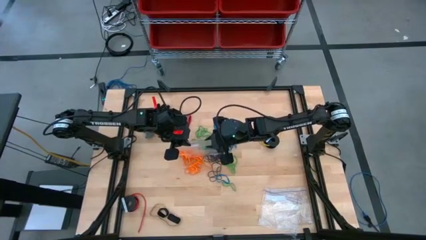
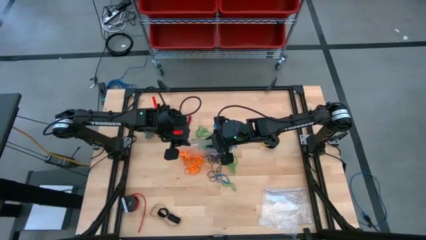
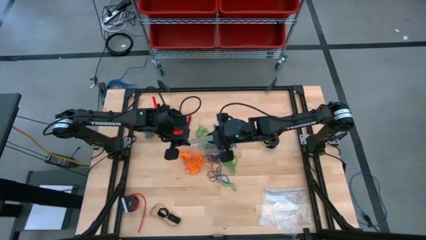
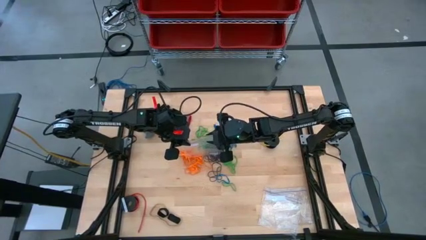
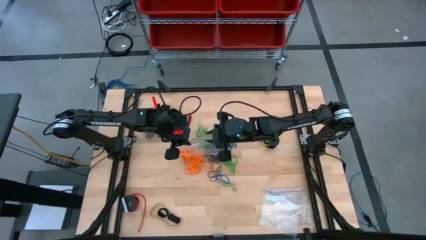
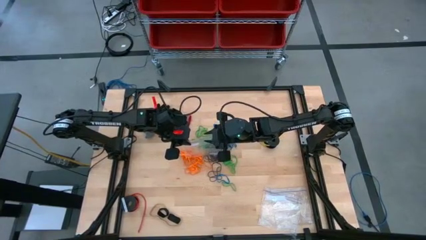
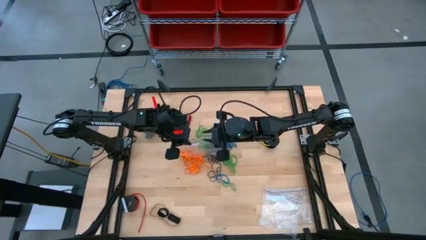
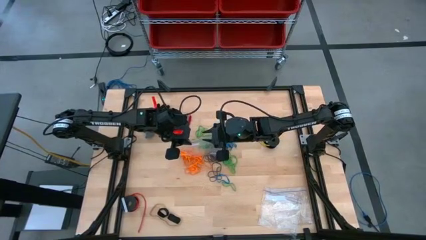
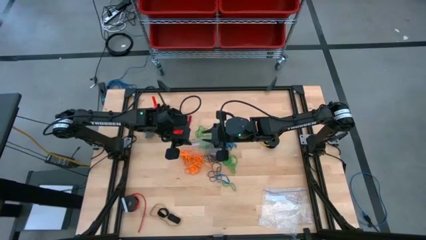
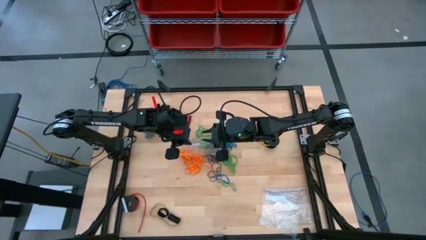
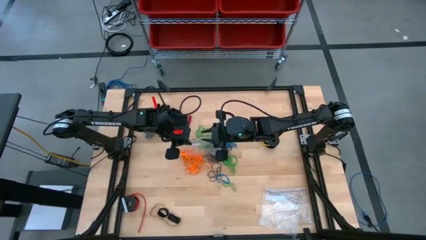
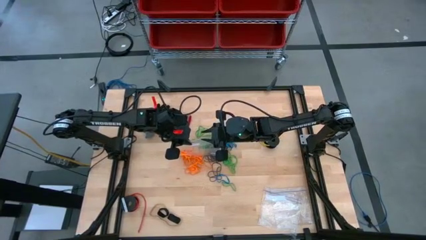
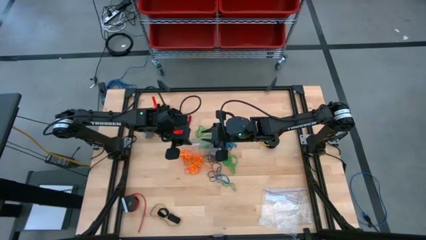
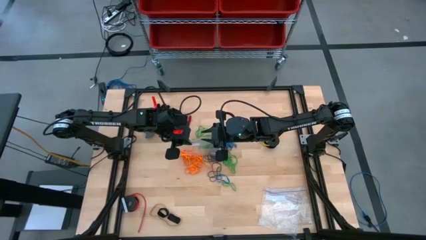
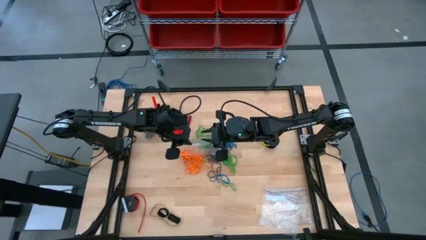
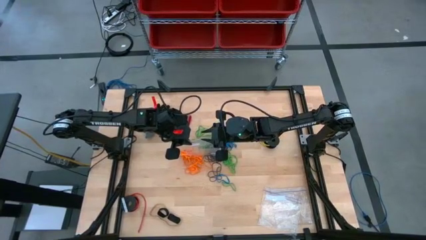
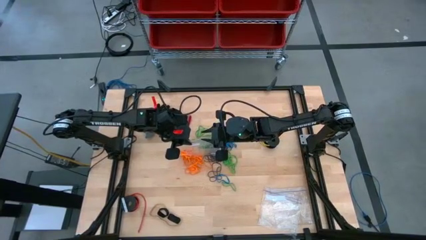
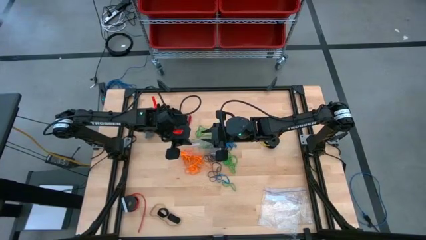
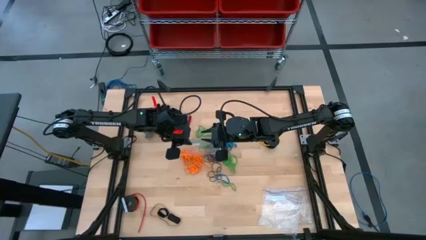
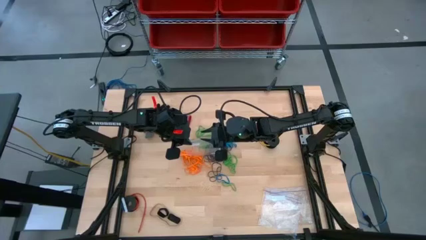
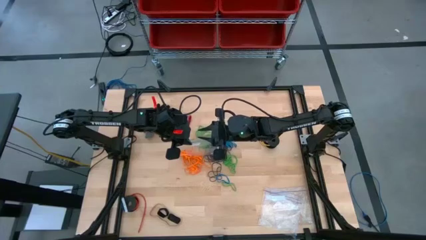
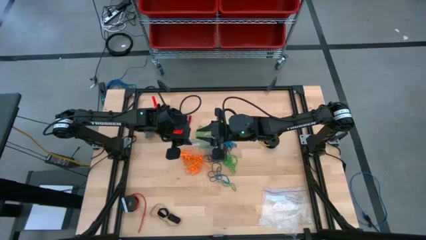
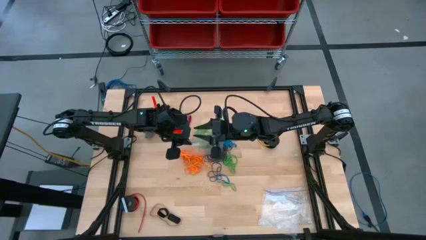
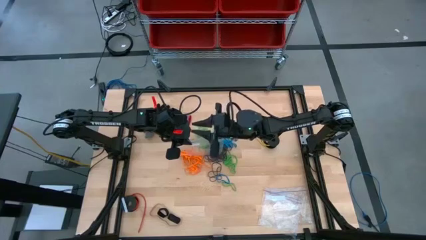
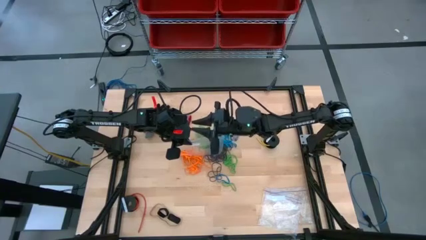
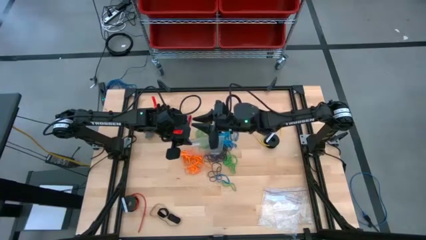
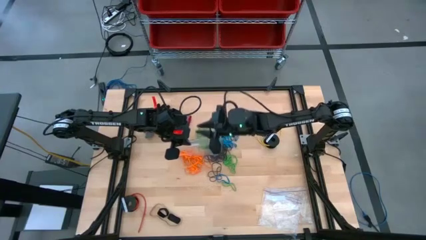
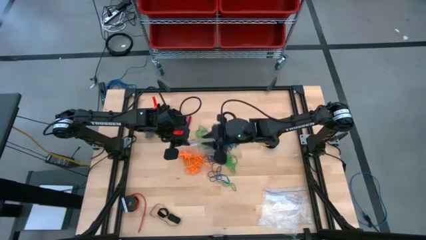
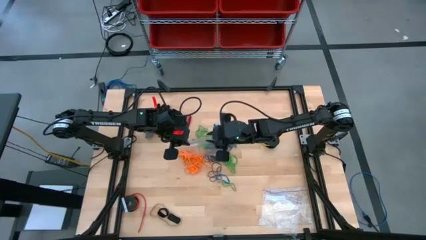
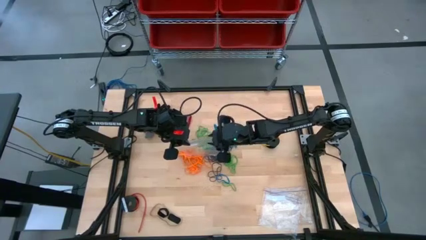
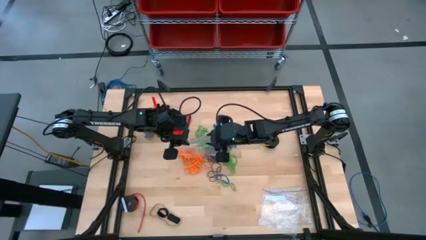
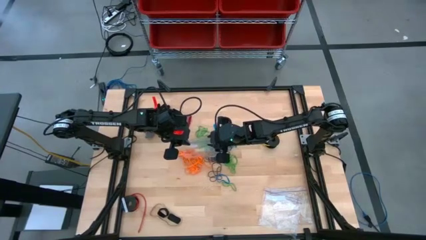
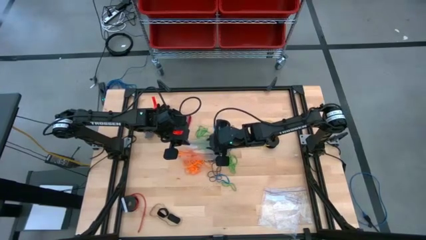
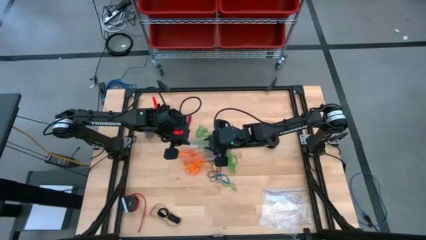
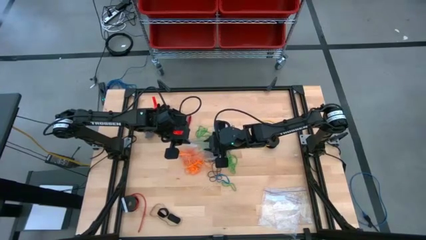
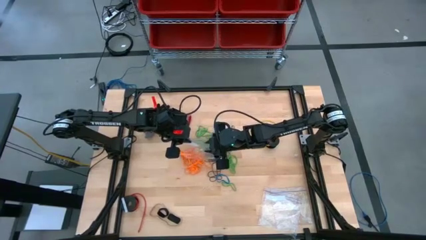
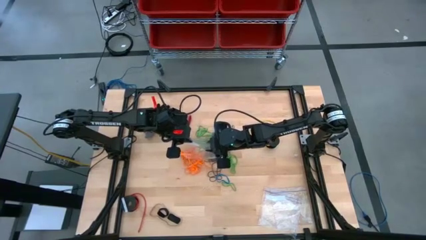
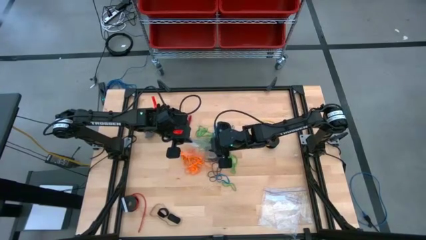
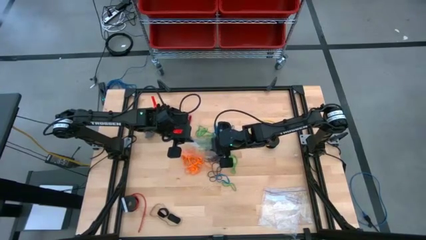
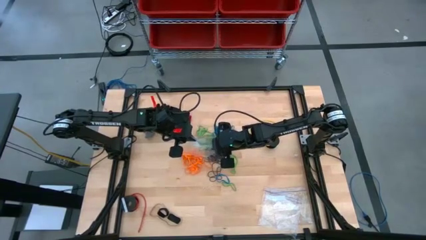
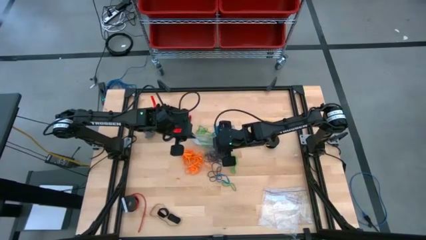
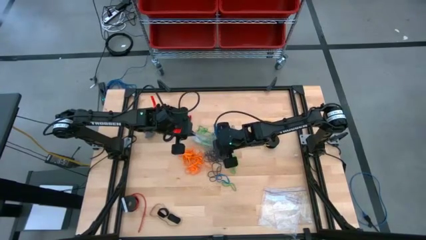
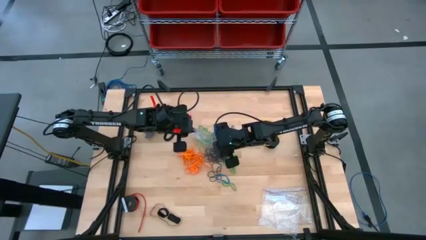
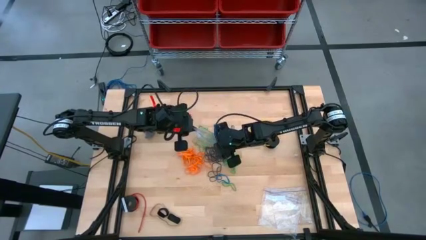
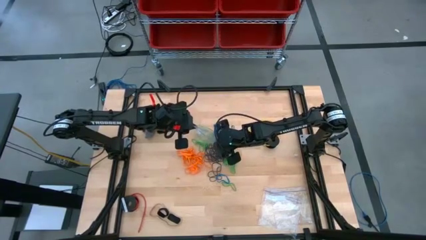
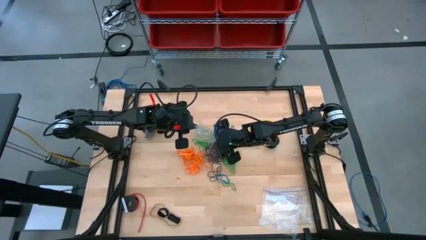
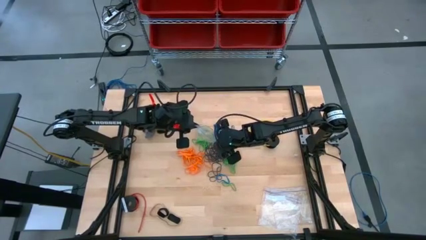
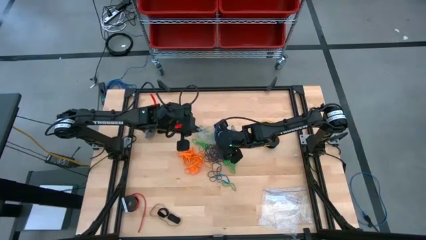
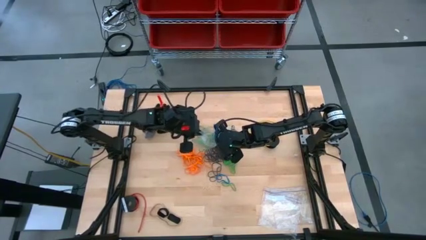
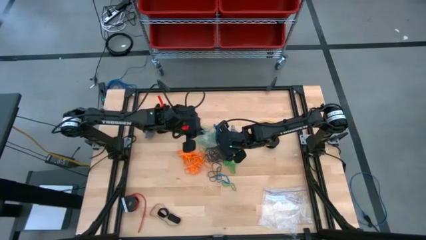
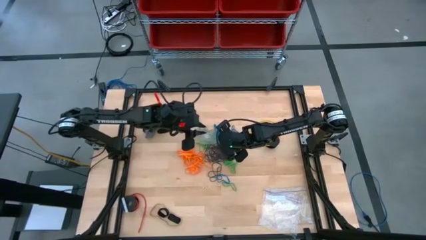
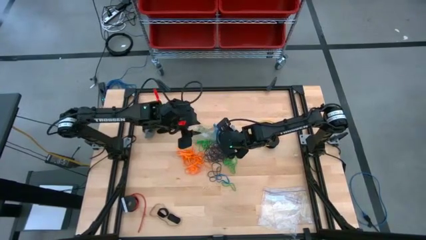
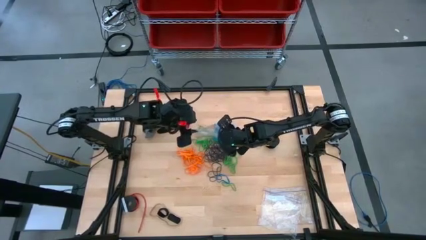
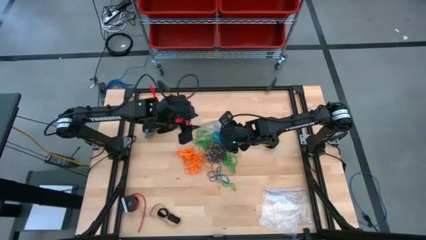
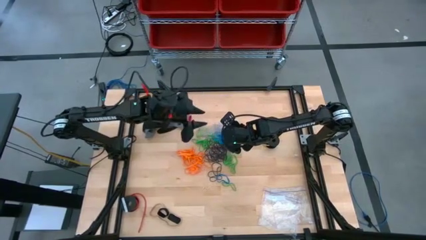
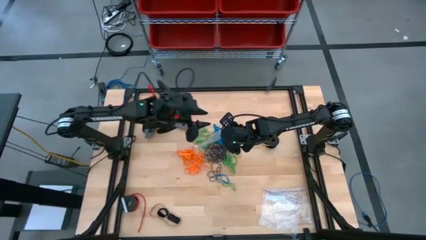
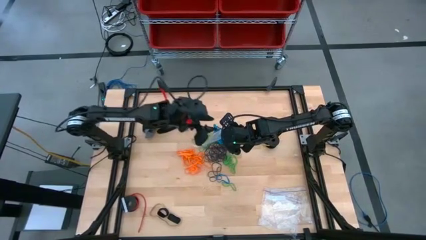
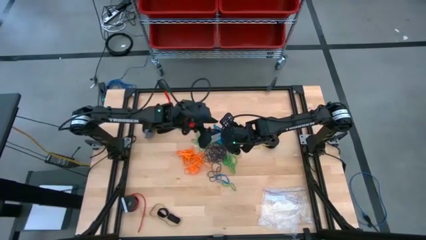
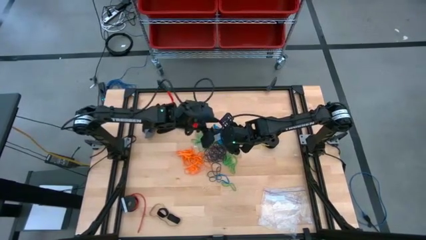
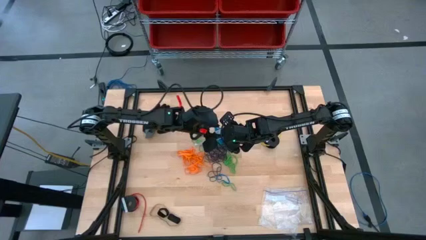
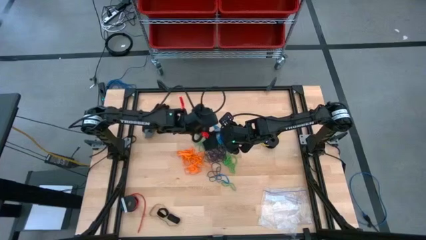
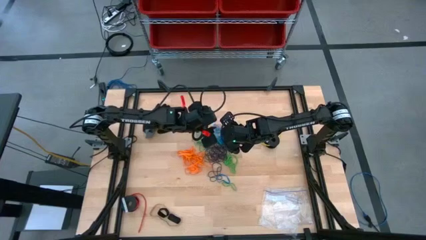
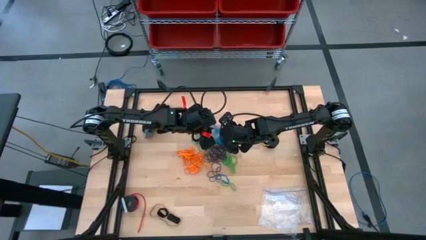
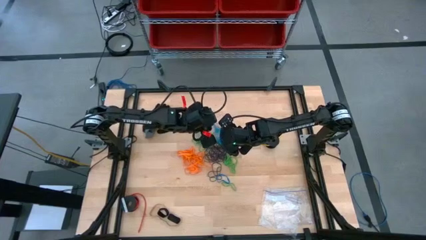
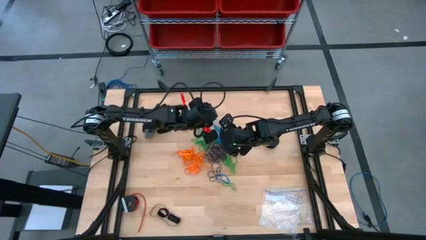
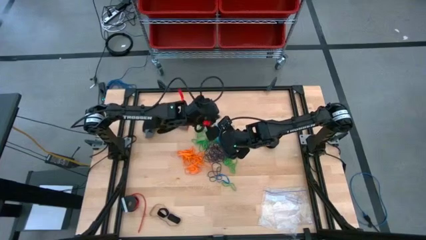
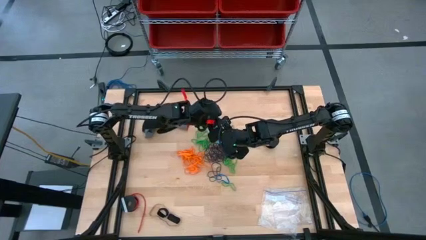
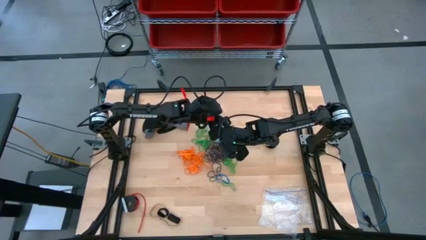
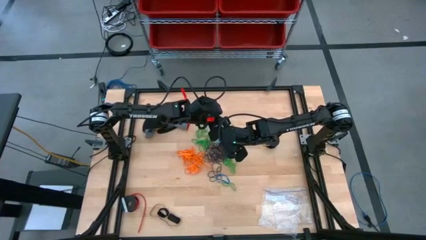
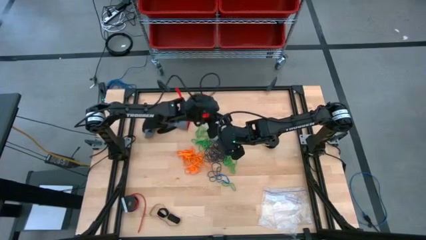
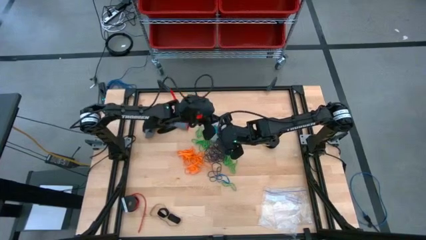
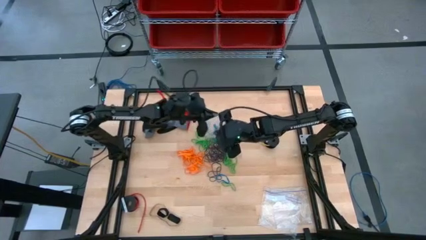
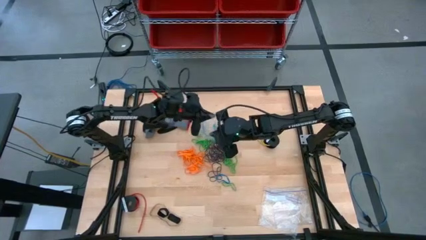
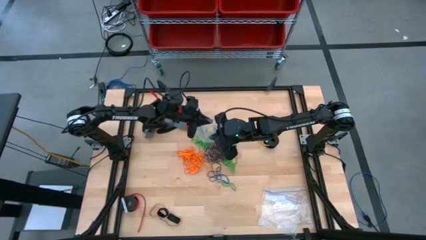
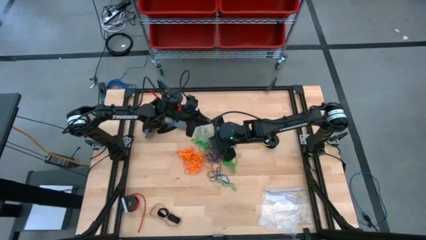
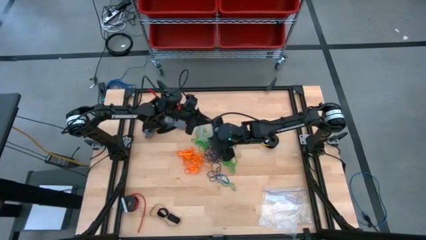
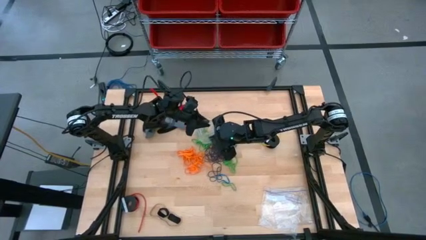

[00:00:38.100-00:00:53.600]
Task: Sort rubber bands
Open the transparent zip bag
